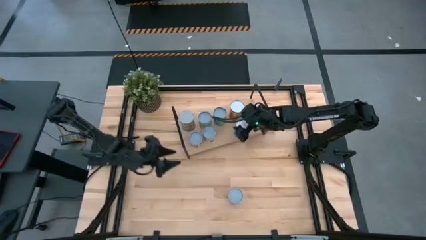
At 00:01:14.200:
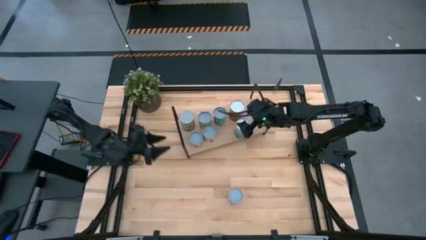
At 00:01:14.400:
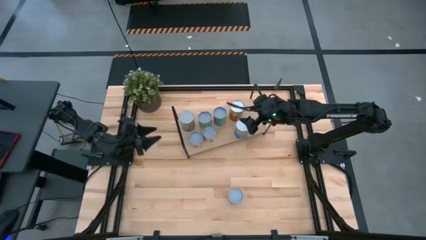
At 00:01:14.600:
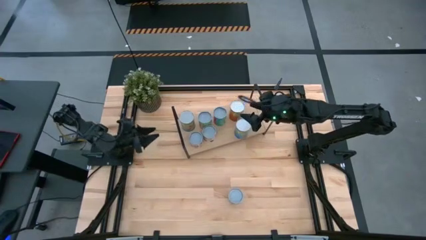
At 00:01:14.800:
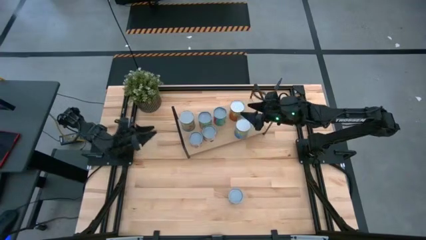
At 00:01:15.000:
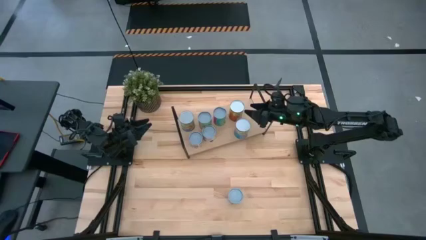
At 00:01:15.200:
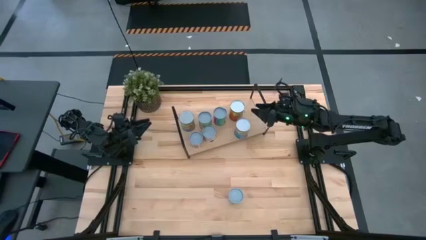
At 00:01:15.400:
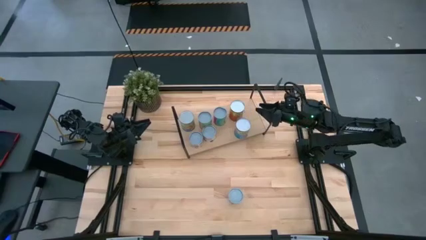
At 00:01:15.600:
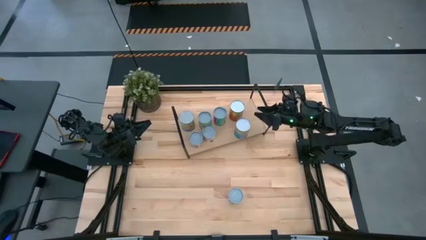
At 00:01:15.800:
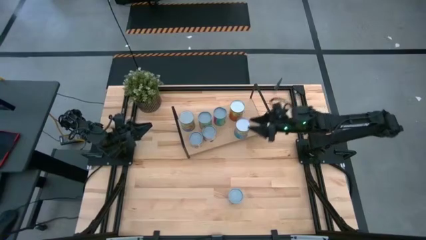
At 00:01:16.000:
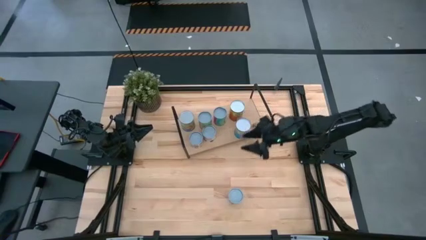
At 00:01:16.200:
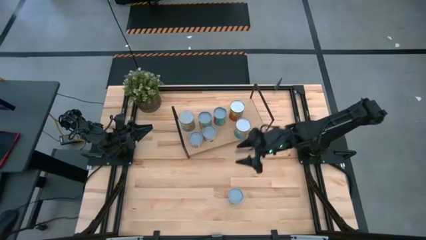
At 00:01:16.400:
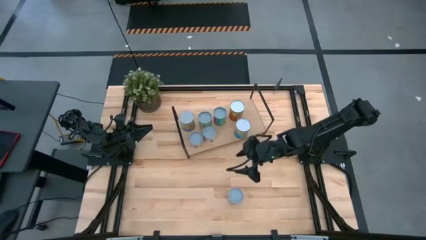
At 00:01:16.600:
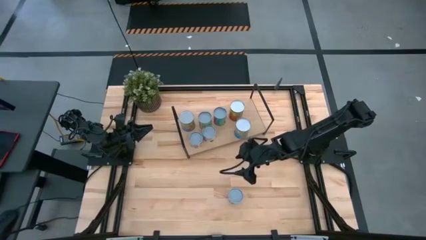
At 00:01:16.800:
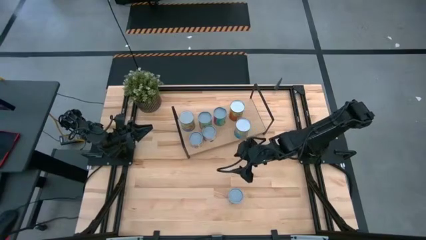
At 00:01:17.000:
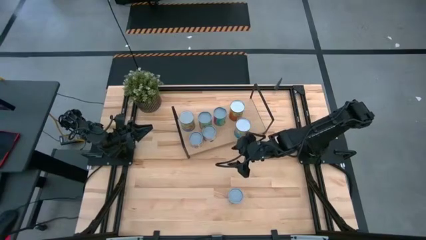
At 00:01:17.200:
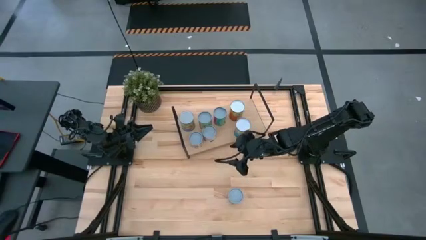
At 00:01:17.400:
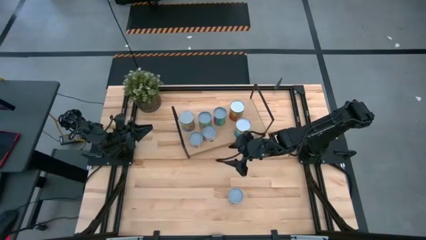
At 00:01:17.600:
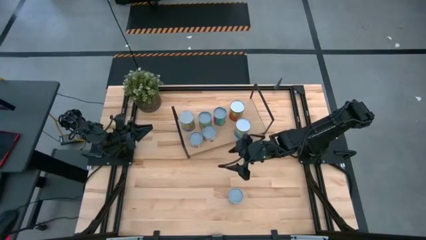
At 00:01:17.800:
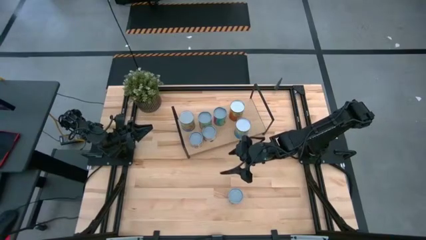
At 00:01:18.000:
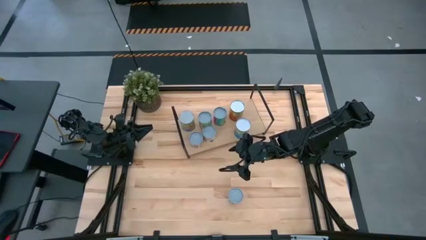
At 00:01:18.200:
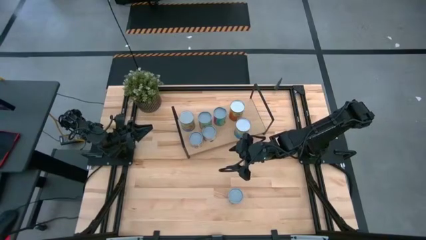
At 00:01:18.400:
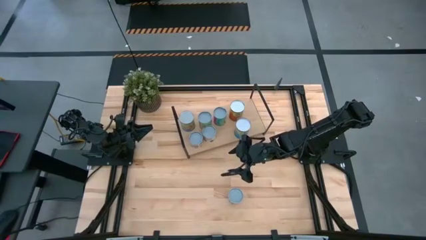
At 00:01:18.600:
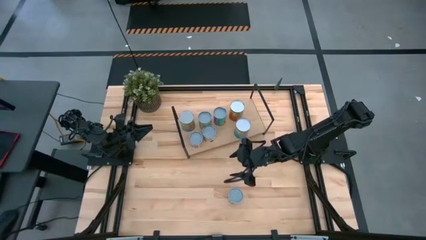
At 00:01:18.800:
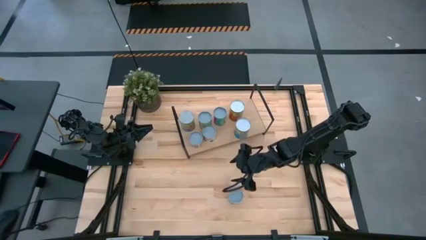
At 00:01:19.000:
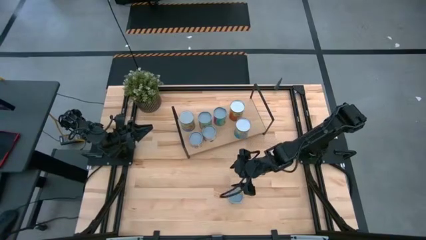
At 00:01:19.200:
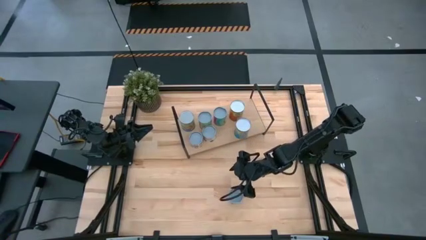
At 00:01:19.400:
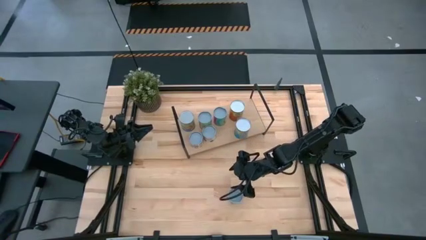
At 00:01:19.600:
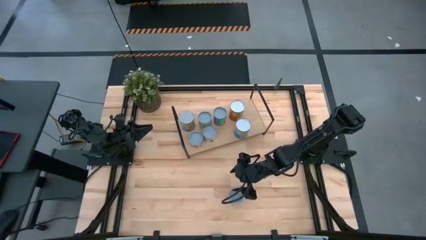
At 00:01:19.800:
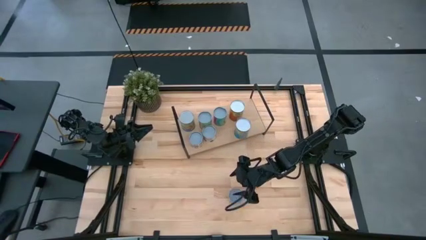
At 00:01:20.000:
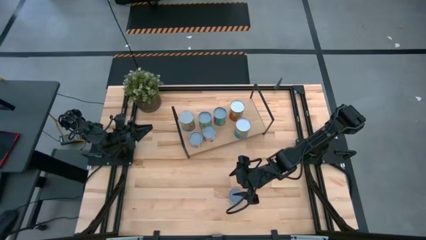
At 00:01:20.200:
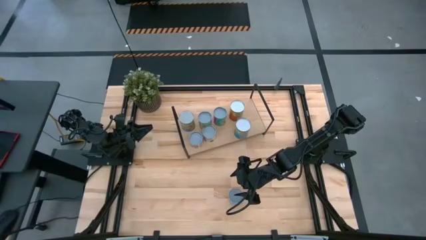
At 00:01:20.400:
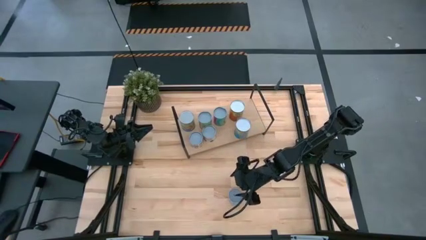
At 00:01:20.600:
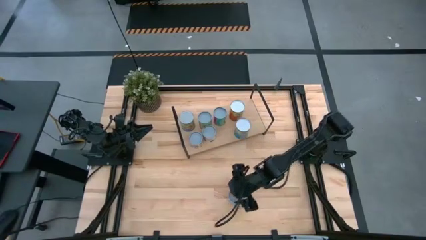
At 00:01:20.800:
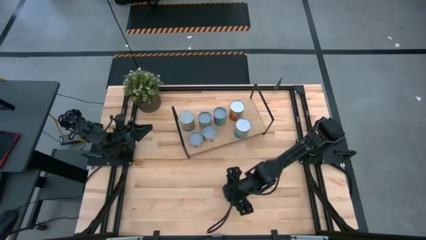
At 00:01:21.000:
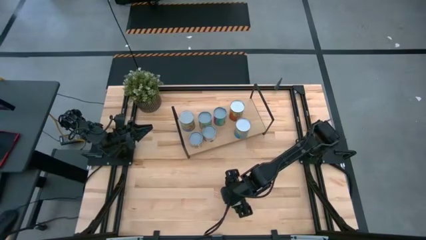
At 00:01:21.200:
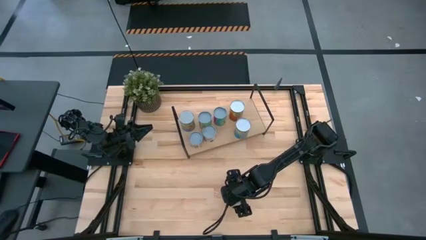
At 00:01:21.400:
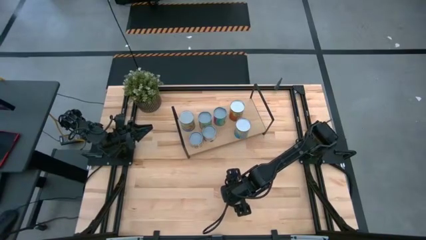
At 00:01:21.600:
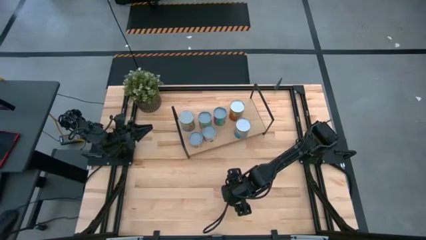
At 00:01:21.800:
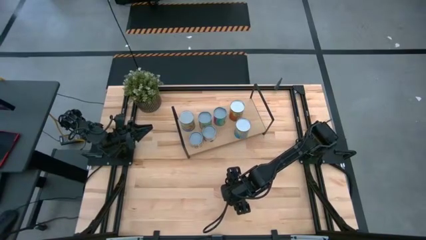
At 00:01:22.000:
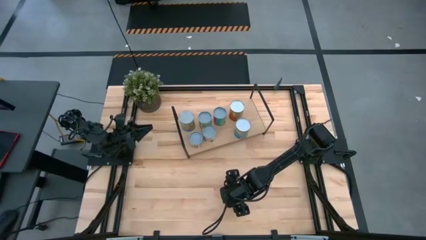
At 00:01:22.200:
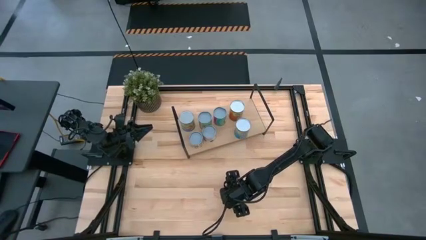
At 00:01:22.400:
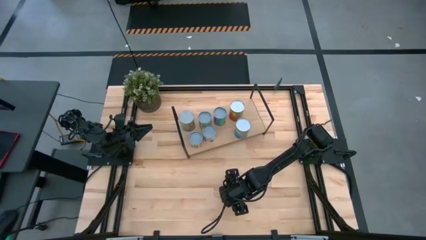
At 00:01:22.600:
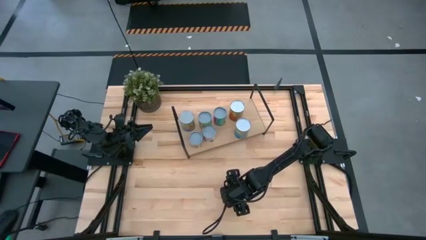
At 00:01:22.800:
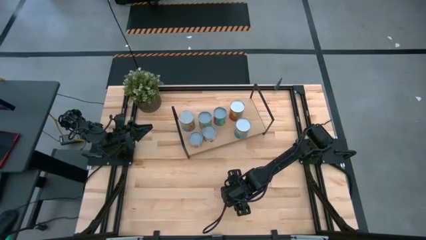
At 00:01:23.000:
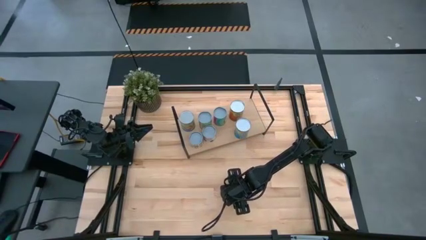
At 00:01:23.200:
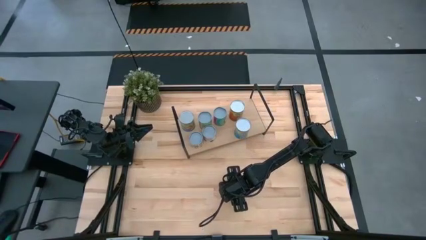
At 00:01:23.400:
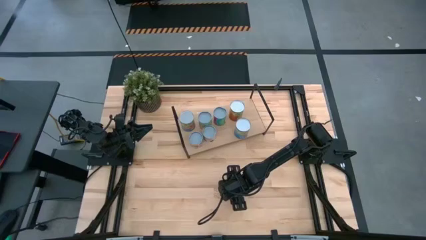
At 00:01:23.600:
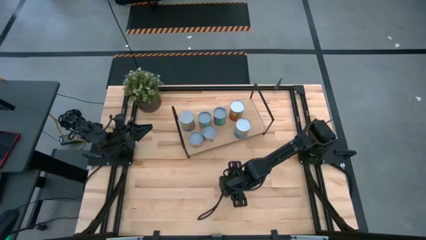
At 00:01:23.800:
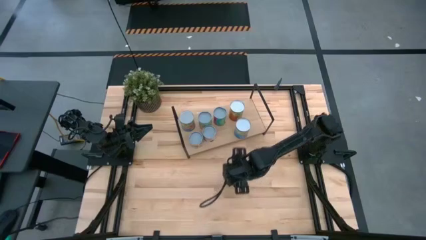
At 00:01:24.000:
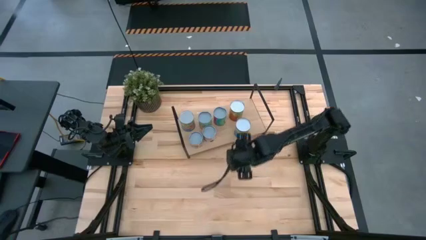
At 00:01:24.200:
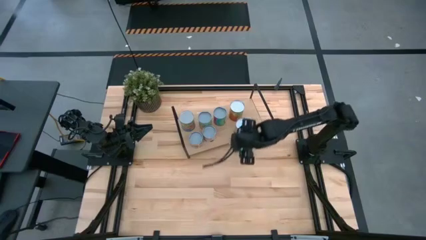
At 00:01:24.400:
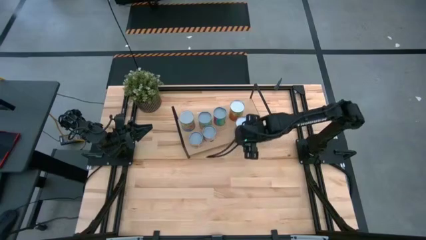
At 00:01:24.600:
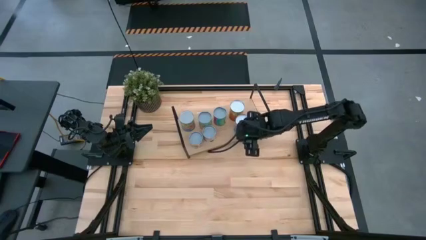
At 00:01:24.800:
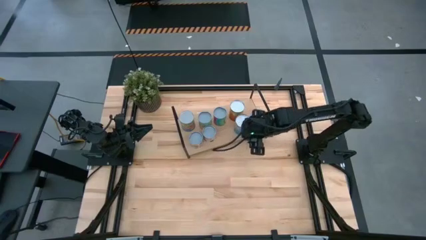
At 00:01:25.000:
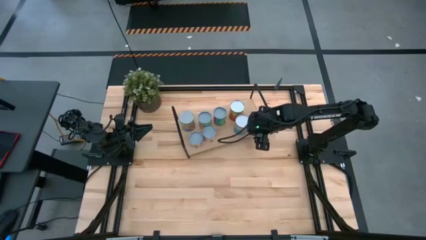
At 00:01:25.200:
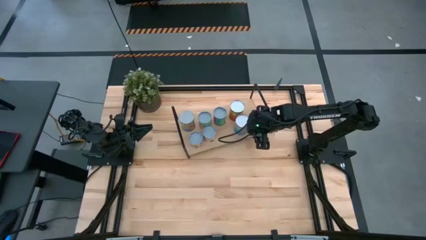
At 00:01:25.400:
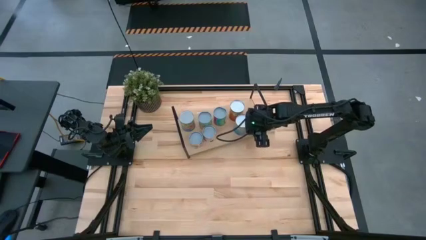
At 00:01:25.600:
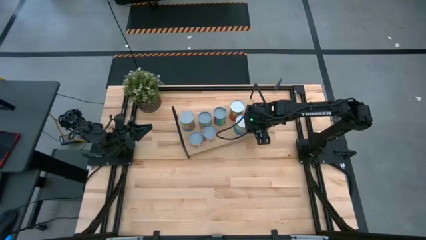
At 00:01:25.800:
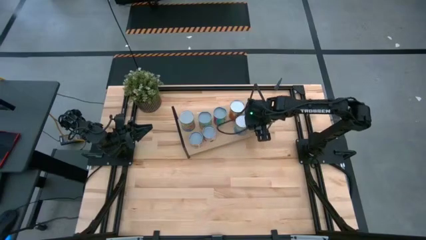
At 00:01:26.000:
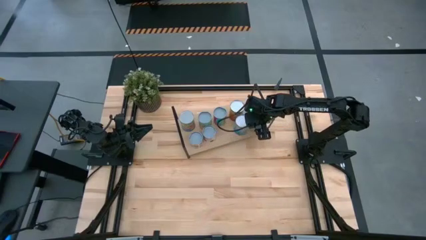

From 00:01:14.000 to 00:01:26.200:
Task: Pick and place cans onto a shelf
Put the canned carrots on the shelf
